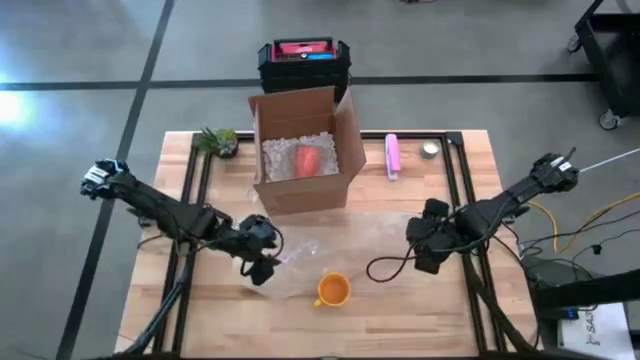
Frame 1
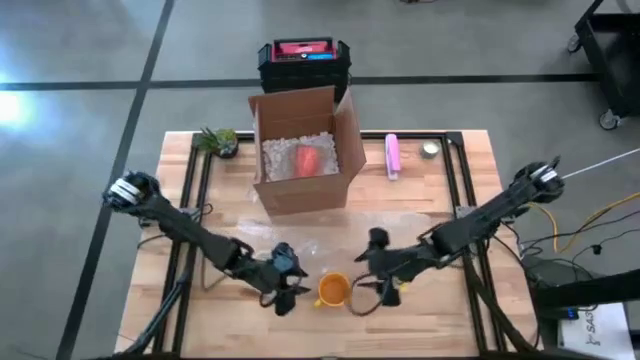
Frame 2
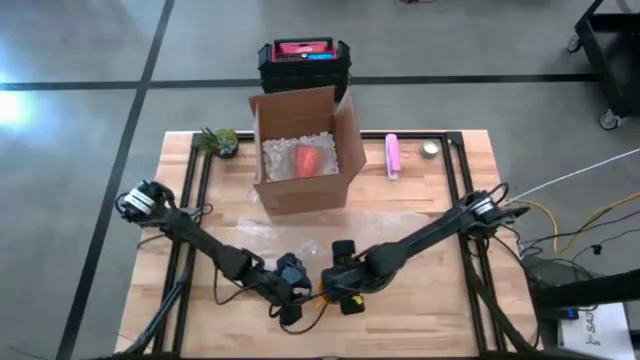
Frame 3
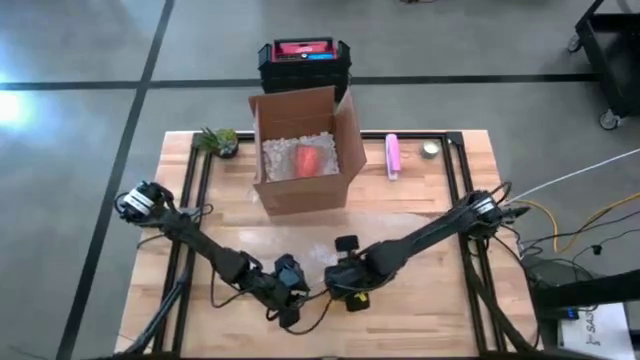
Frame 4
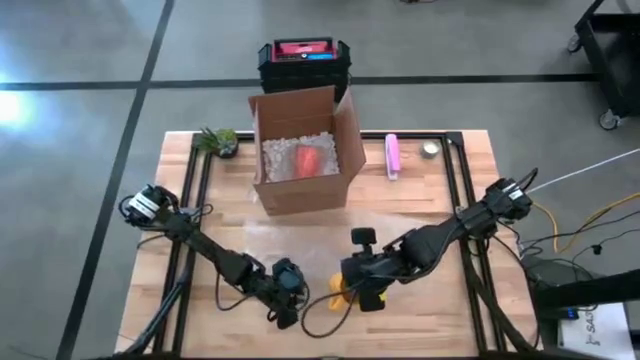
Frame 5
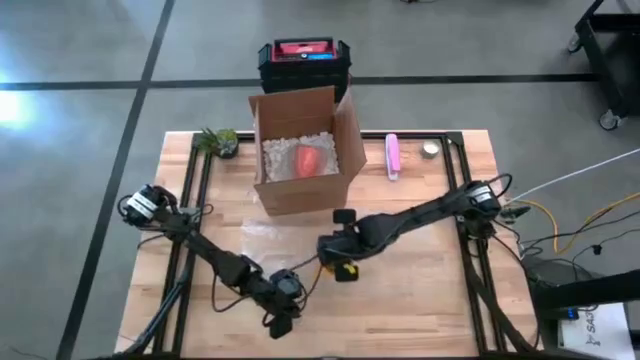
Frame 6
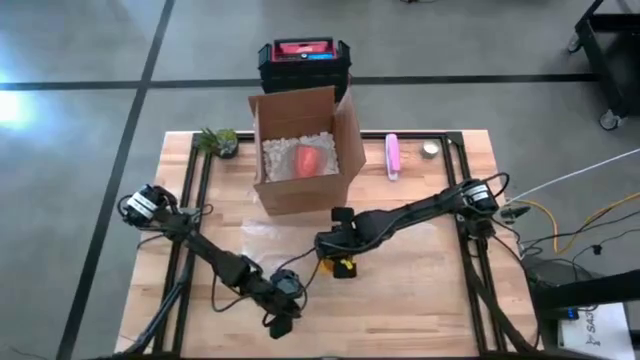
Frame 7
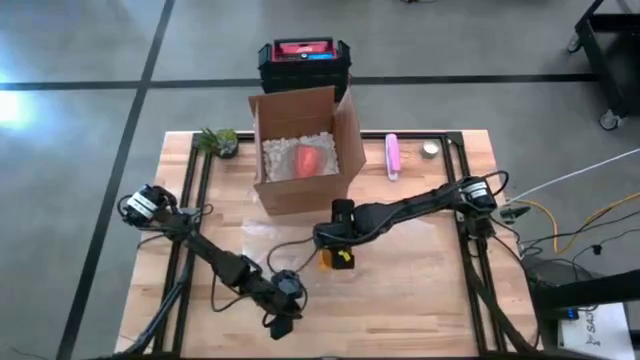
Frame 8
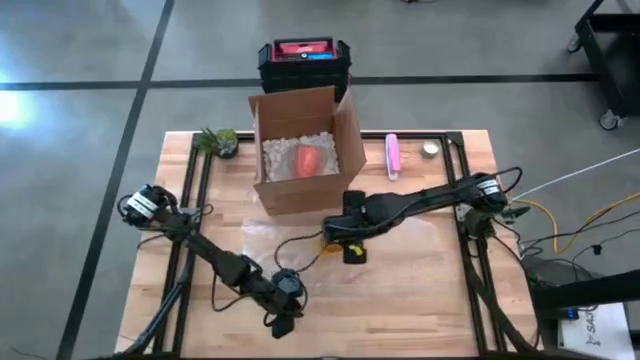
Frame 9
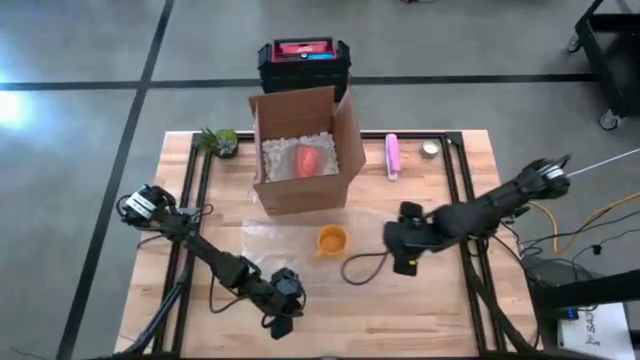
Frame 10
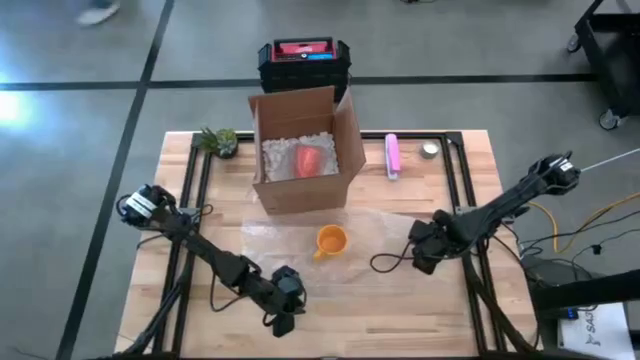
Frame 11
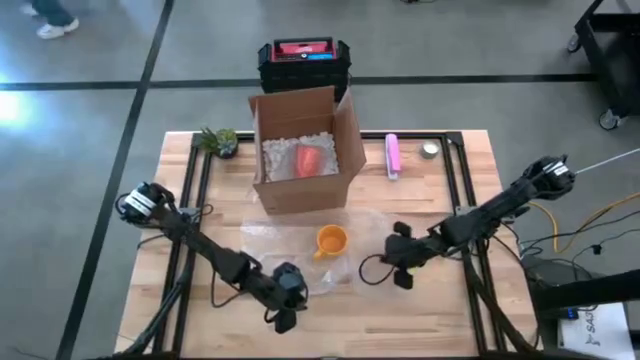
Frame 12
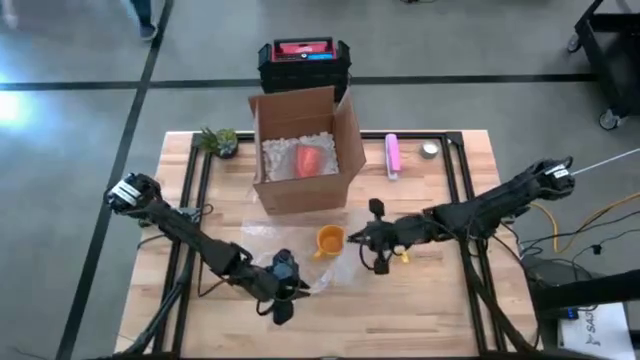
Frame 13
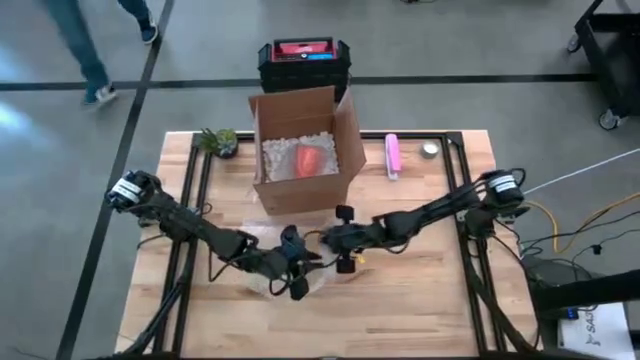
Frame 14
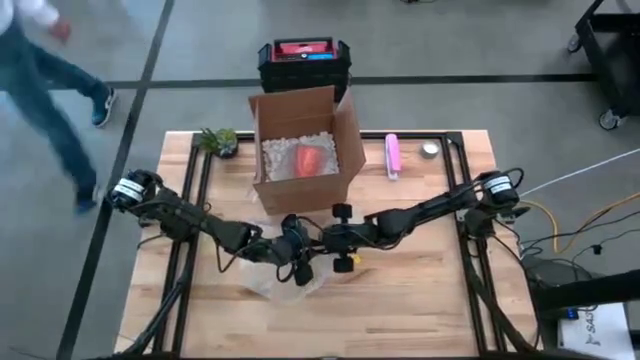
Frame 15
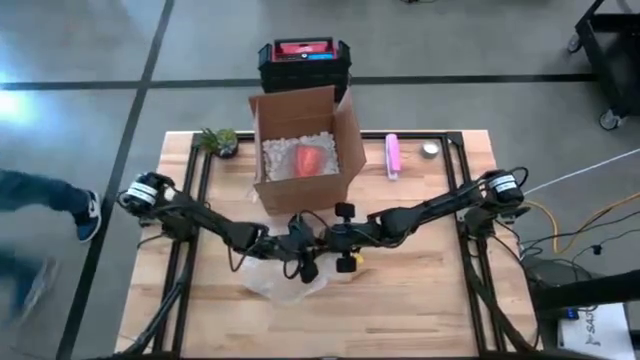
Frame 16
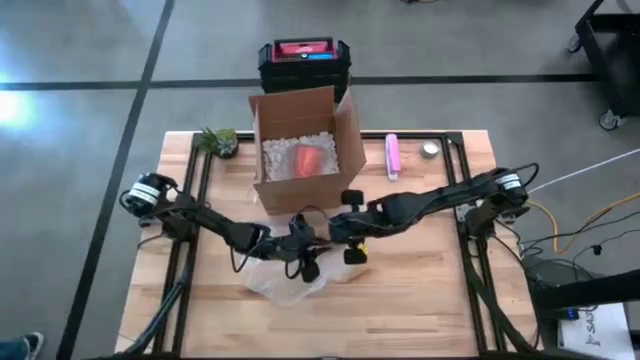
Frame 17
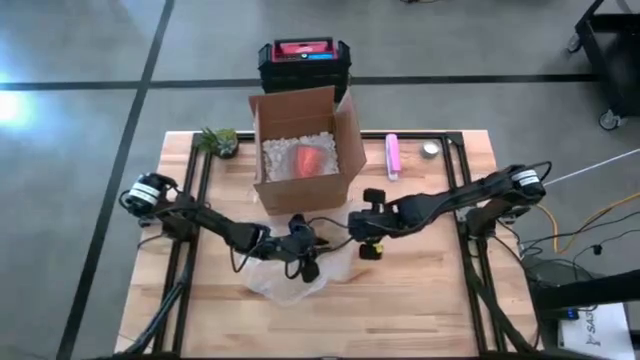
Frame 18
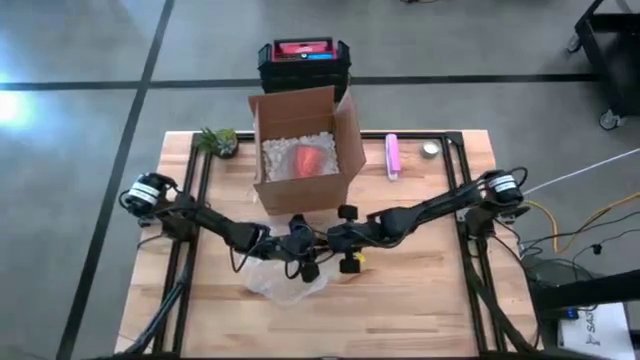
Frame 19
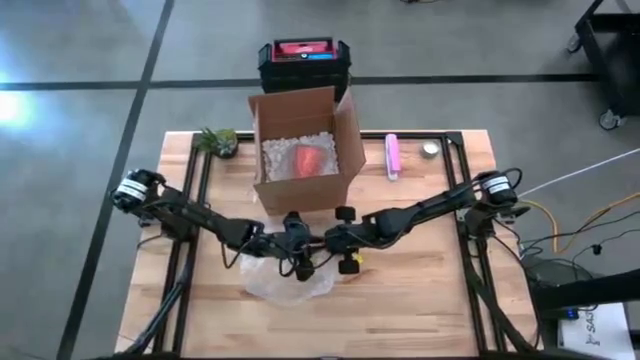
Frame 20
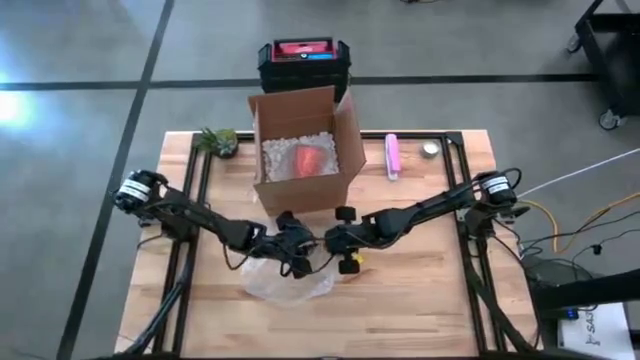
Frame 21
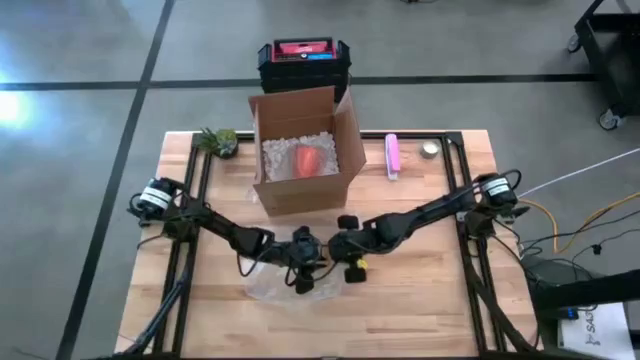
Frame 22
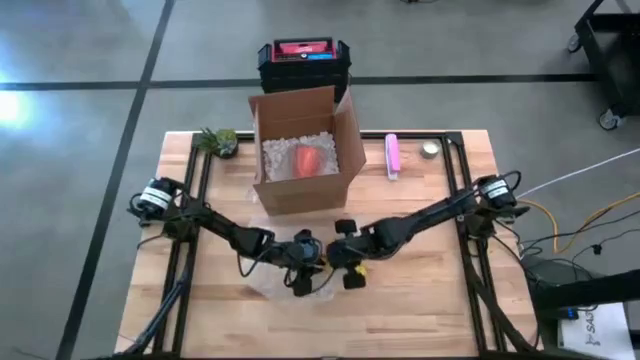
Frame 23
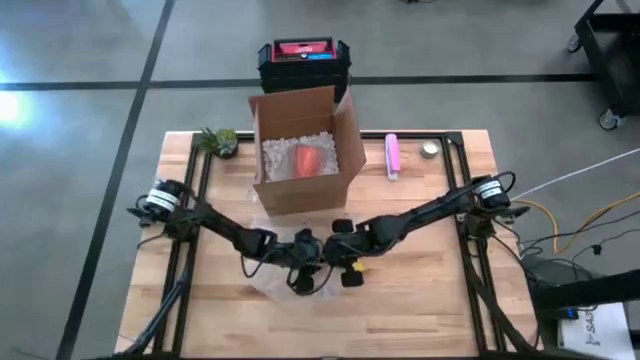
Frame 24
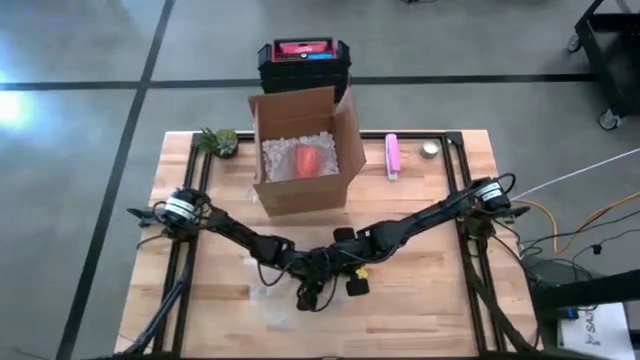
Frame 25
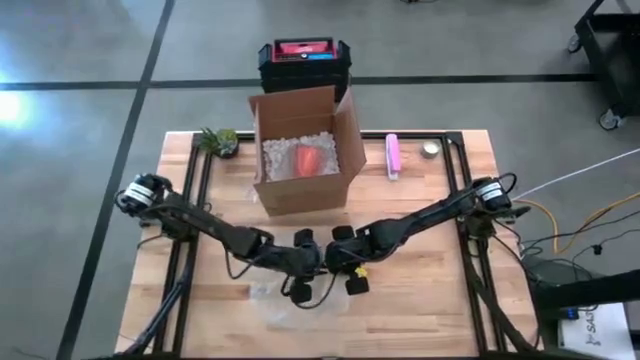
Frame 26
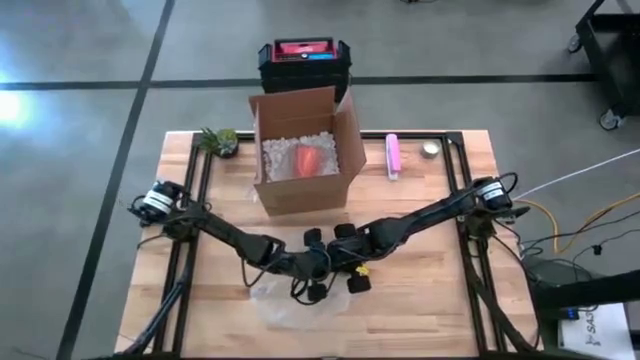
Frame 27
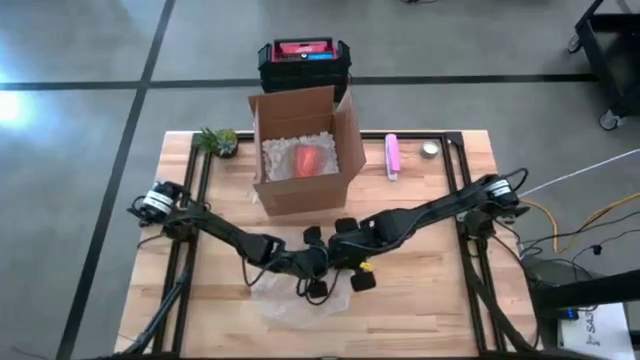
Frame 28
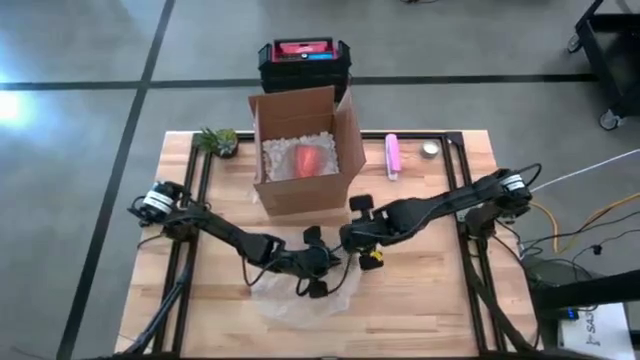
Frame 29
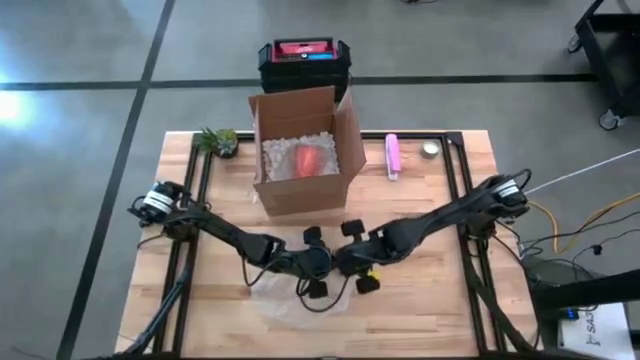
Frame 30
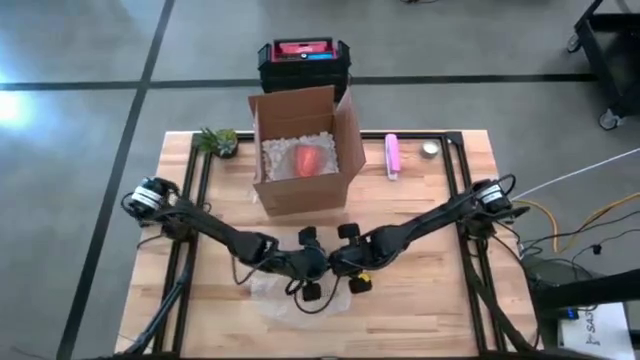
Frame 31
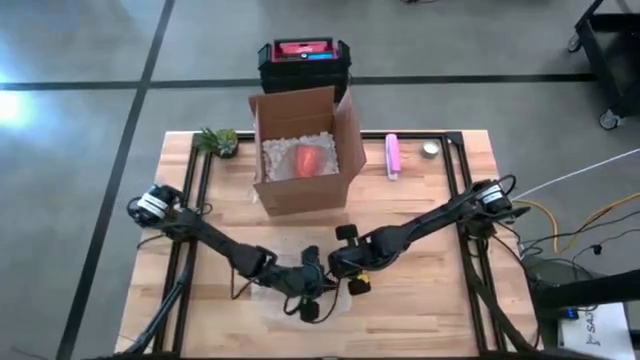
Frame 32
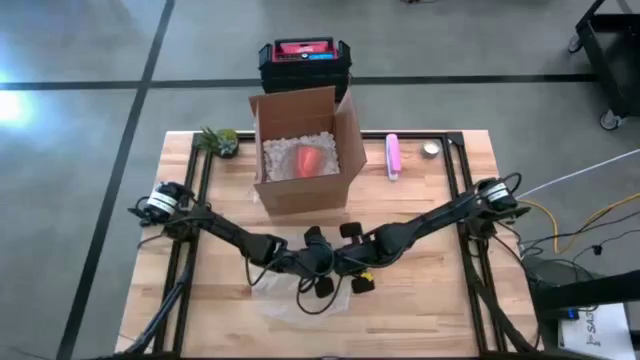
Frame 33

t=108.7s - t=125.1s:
Task: wrap mug
Wrap the yellow mug in the transparent bubble wrap

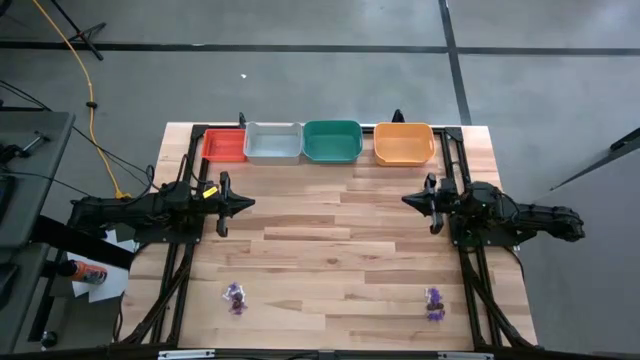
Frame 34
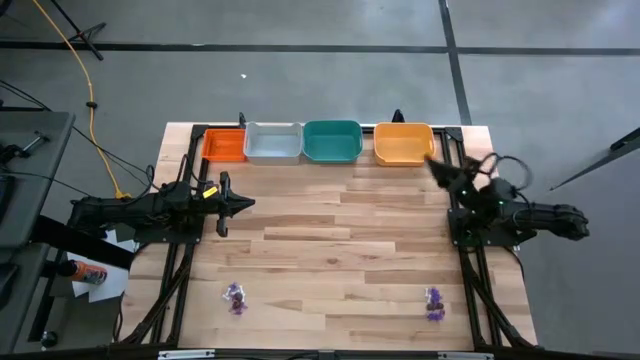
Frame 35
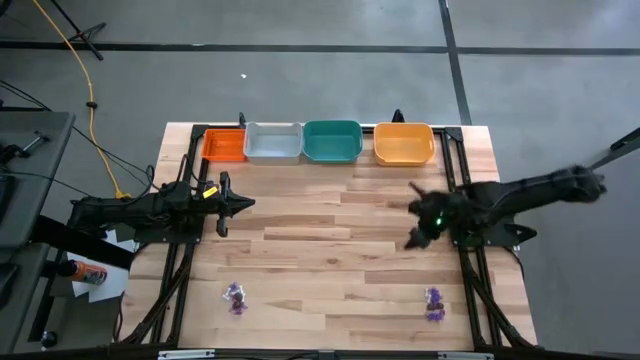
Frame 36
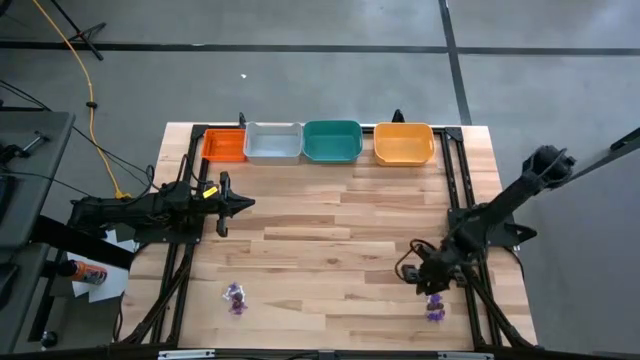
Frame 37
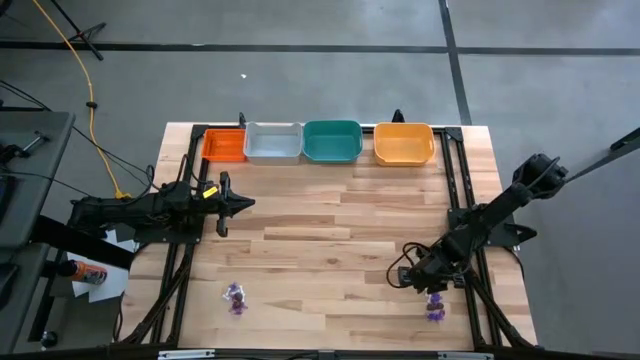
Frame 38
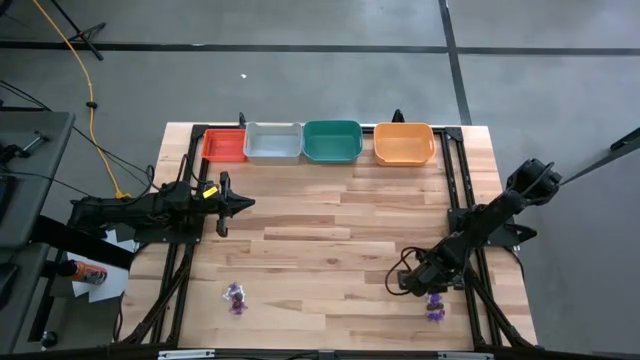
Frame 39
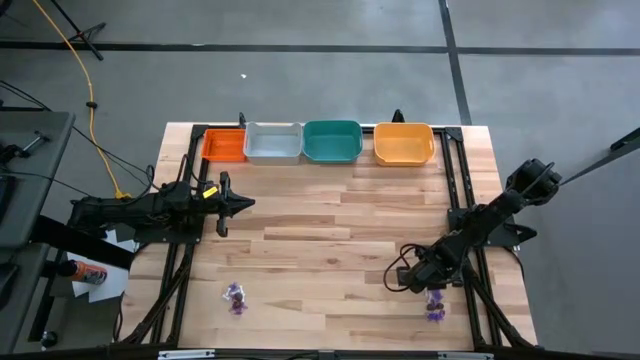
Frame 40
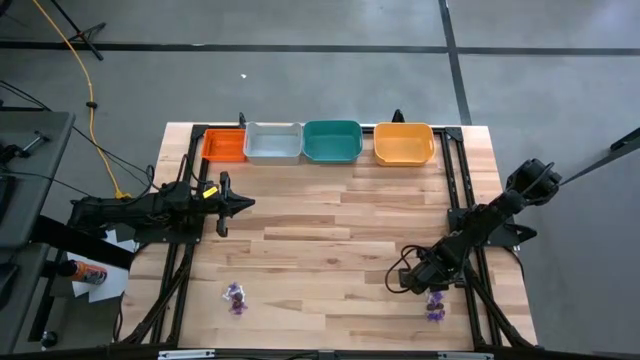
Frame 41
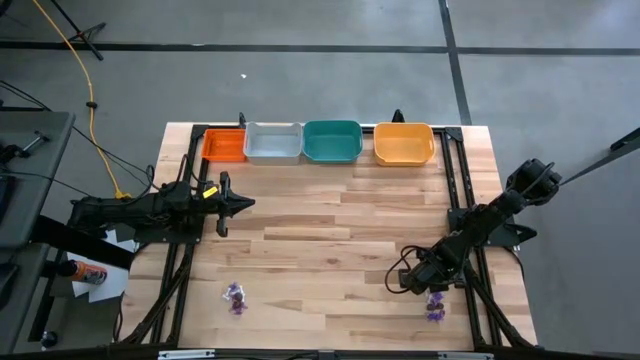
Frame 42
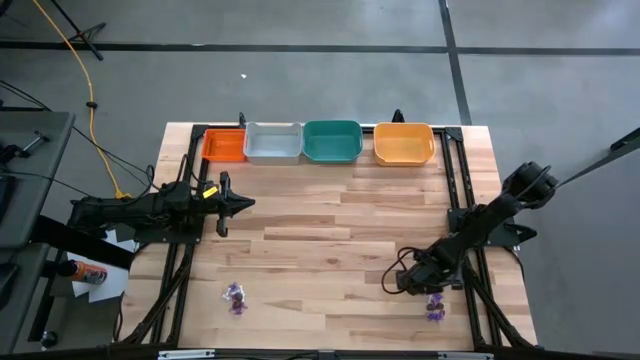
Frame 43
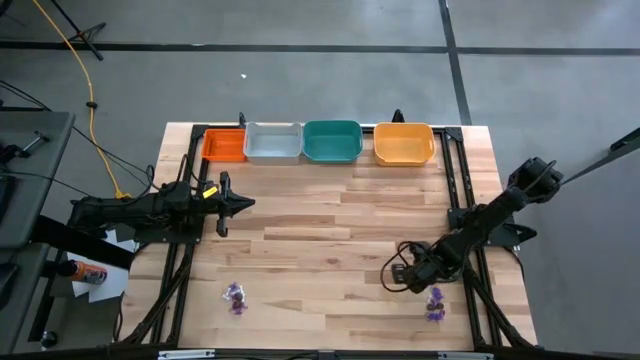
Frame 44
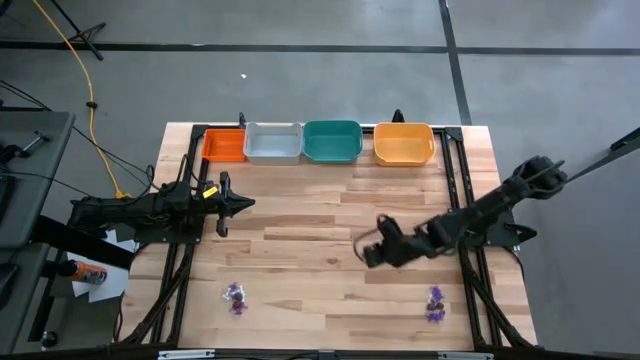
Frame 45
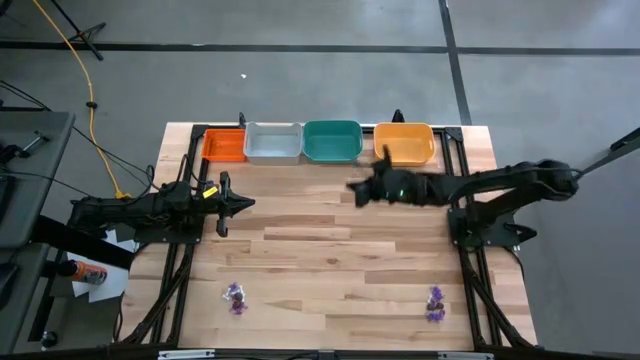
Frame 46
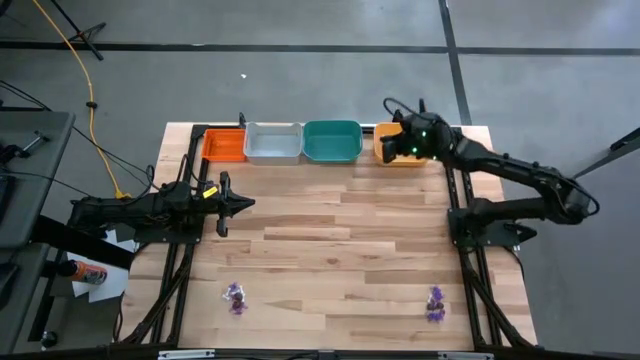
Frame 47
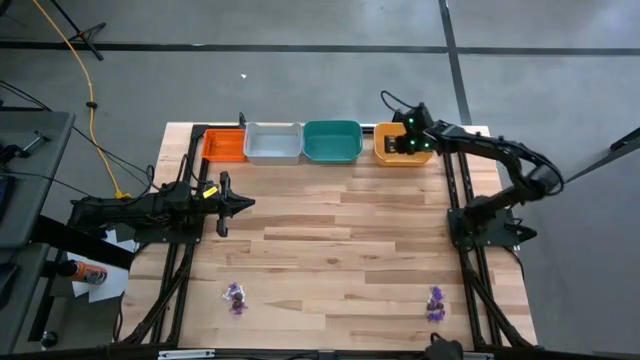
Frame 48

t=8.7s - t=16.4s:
Task: Sort Halloween decoration
Put the white bone into the yellow bin
